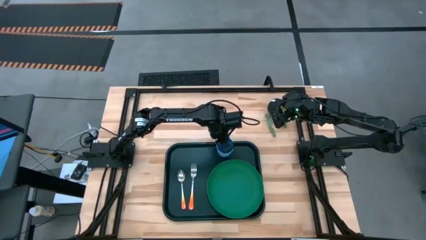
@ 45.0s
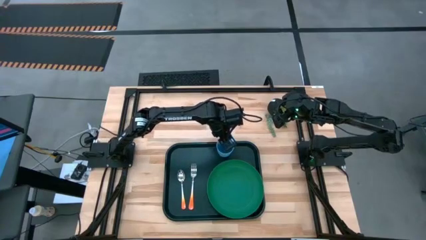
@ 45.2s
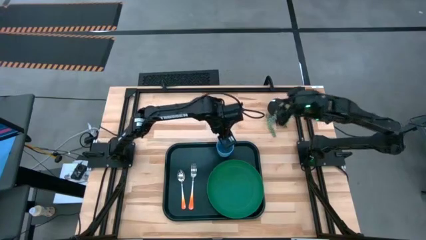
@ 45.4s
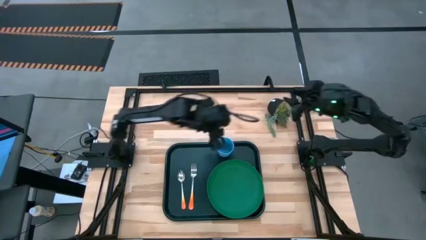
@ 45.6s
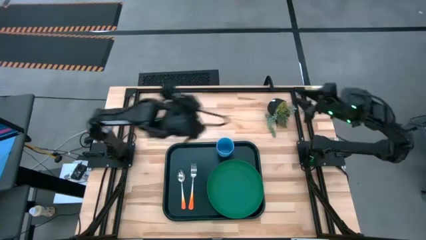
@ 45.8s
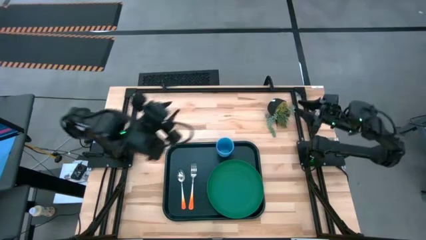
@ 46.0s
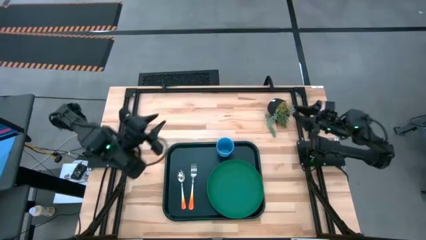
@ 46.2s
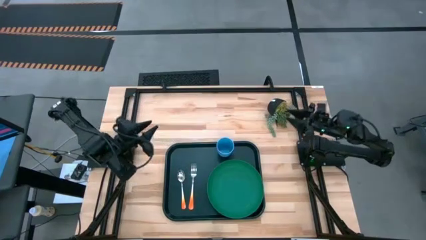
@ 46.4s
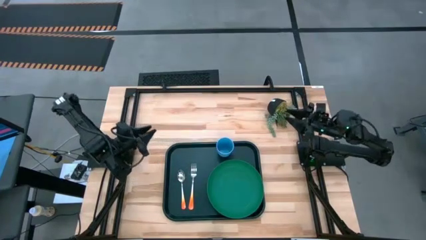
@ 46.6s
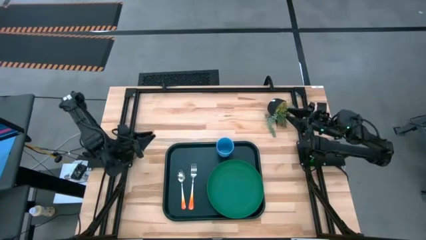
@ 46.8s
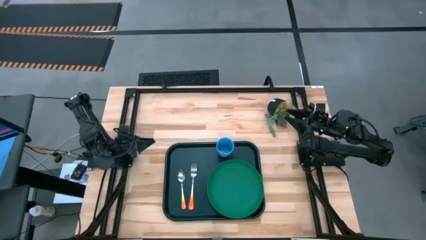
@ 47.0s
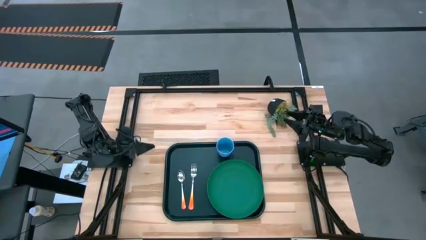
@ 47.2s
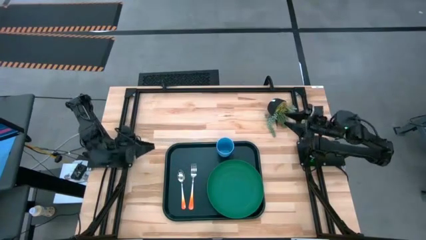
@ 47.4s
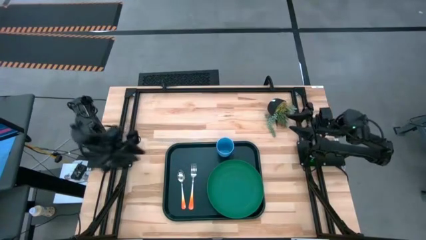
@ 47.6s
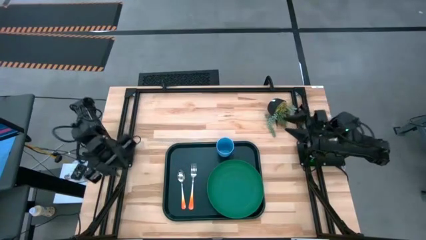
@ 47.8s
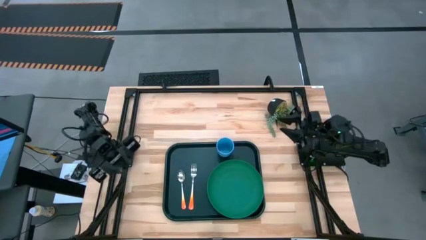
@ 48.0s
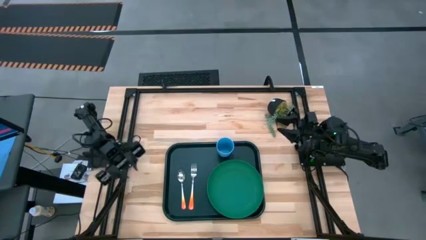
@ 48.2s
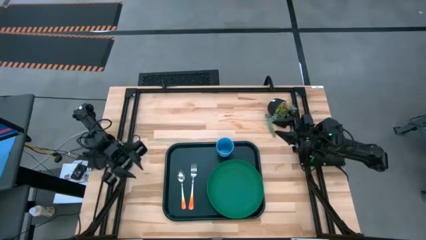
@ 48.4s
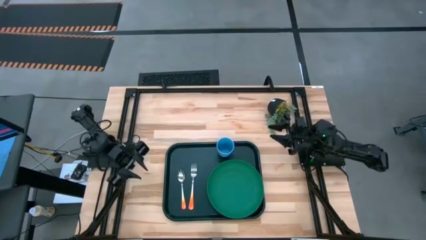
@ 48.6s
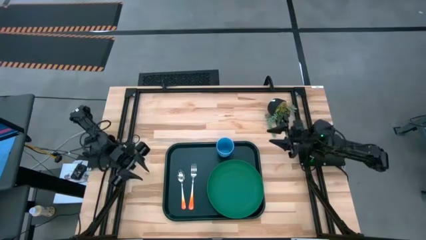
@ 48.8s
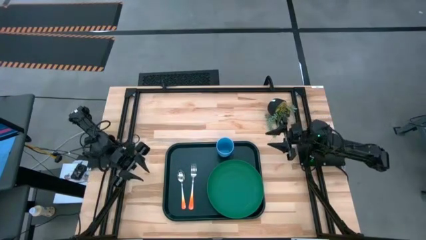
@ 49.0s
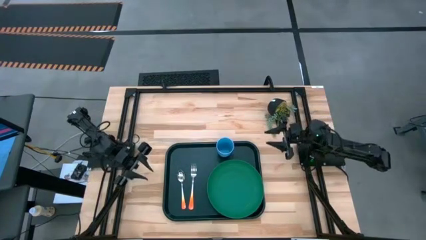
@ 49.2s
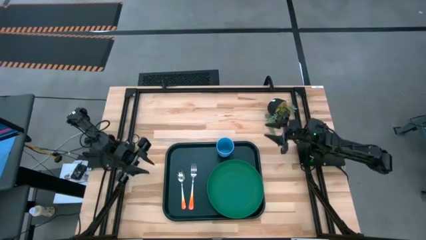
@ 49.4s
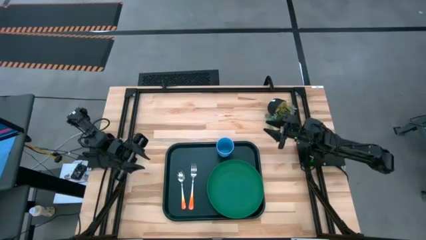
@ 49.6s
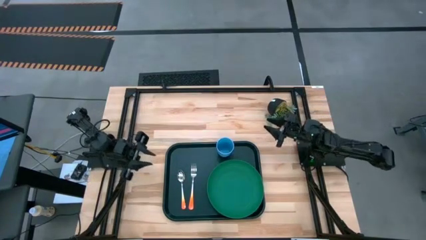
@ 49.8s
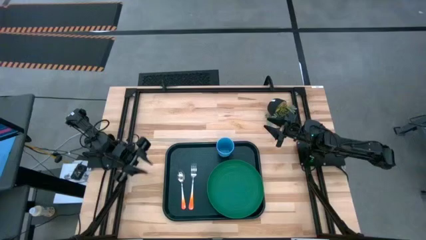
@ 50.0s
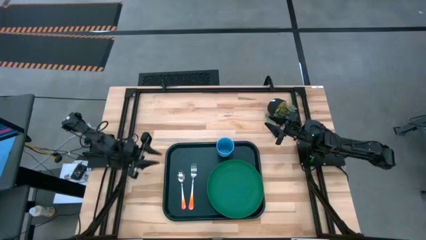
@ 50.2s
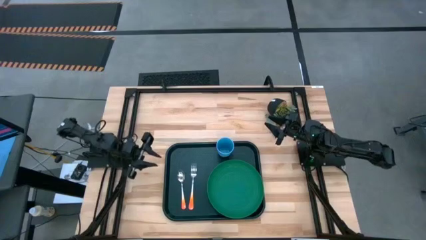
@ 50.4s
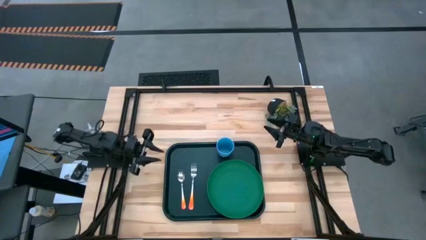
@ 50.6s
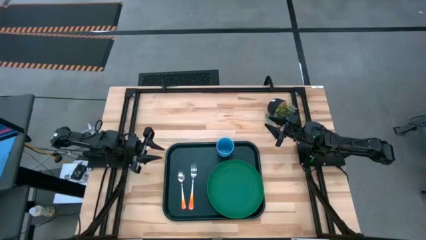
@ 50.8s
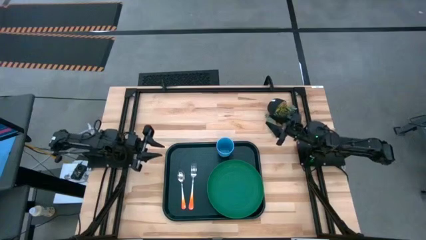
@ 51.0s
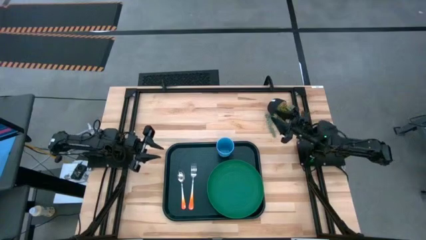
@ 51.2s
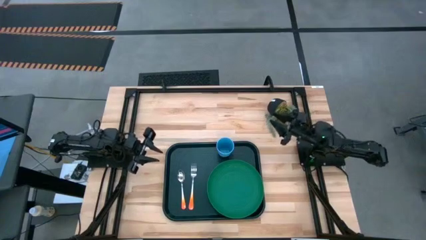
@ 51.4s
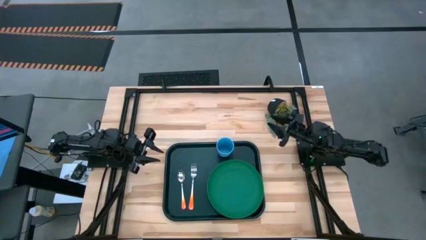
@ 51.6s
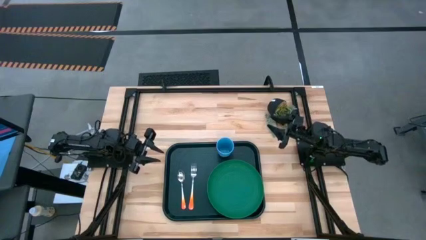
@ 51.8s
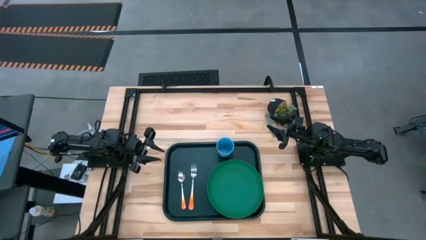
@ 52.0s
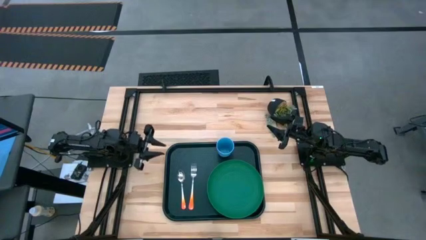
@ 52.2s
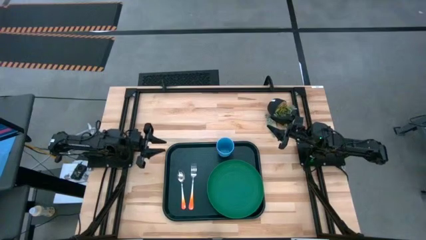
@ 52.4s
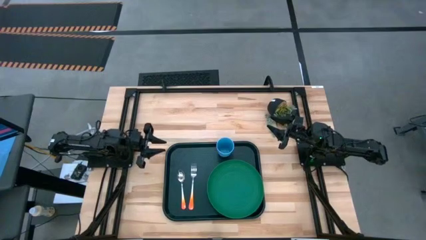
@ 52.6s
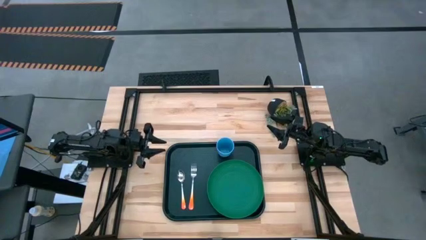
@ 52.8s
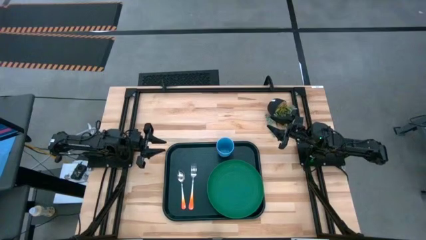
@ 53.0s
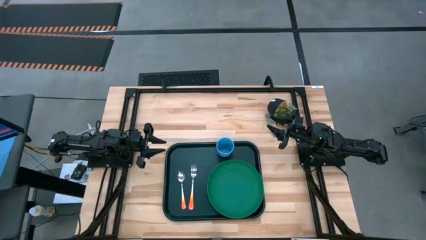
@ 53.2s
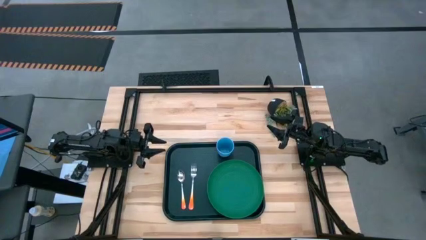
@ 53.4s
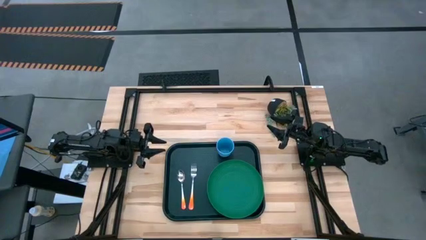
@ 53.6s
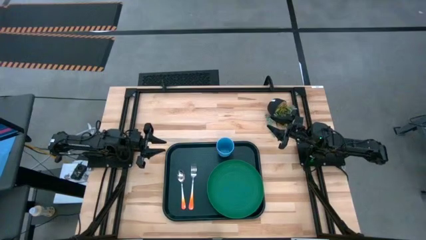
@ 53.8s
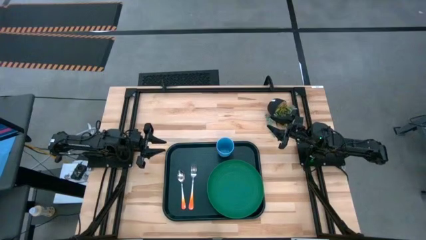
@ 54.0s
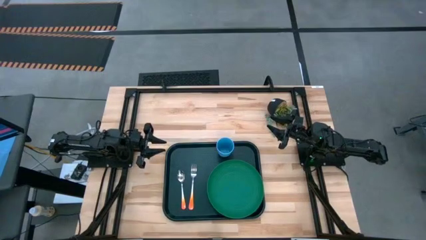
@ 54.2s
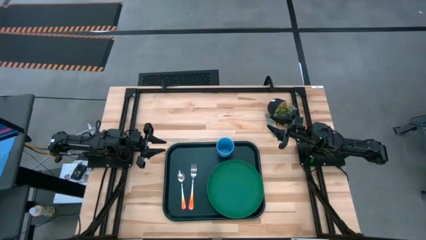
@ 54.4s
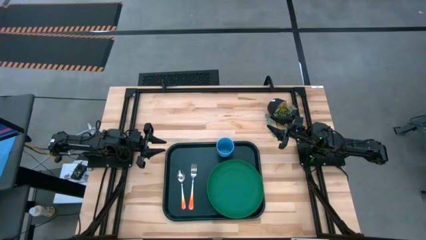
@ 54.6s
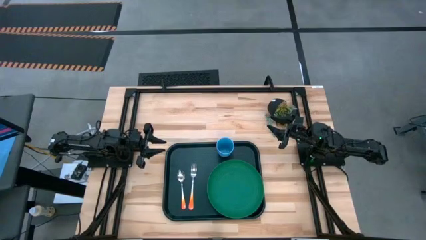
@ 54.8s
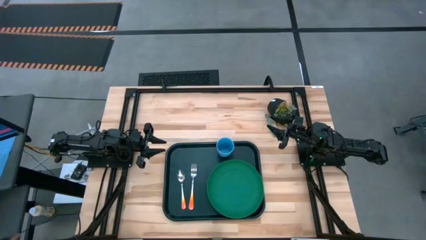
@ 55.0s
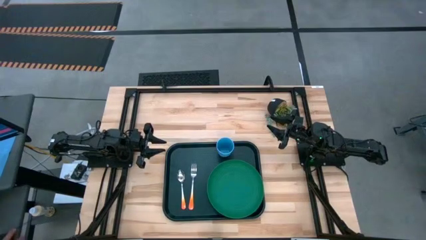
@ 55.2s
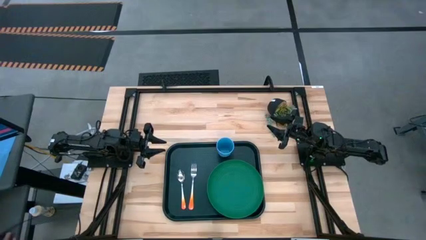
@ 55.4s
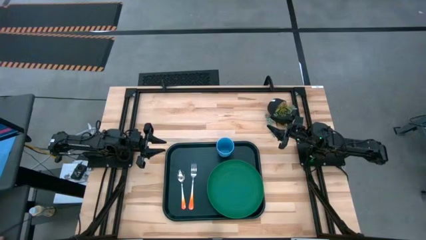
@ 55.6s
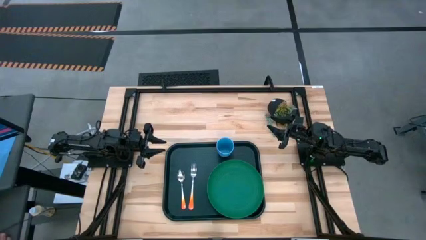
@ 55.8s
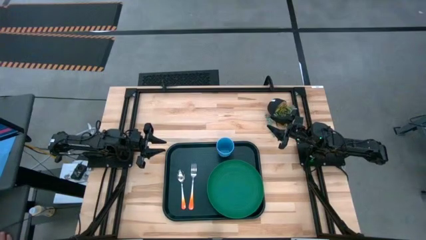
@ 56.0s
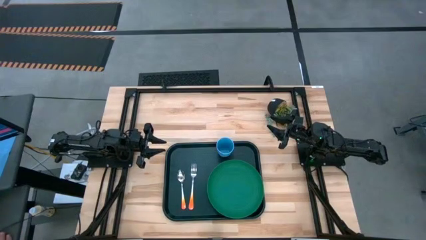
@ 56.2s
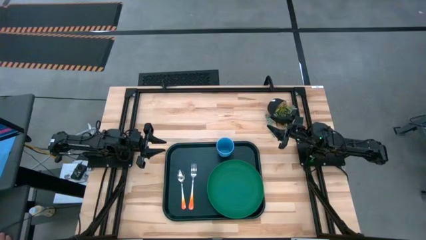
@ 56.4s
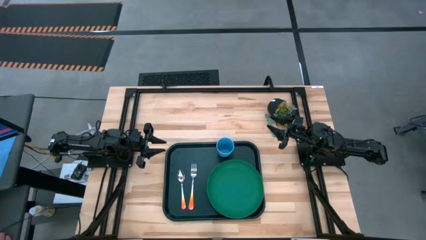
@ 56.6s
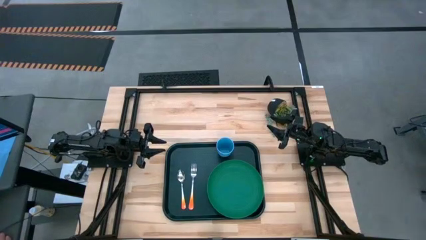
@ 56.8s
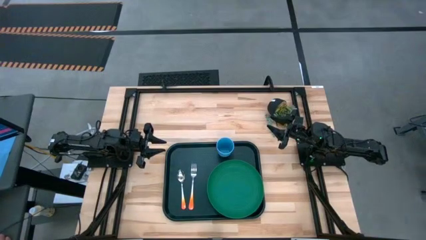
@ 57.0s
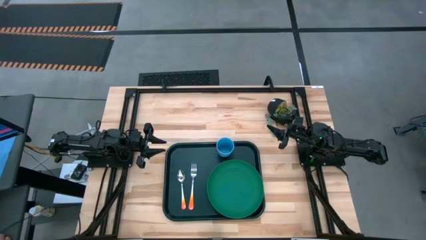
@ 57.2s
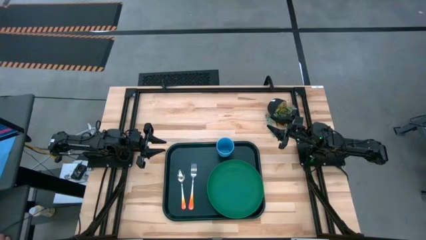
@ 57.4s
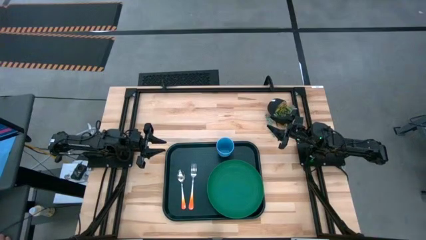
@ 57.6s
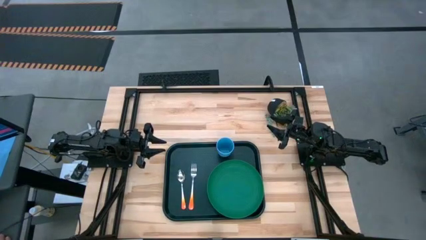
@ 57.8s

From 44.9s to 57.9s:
Task: Pick and place plate/cup/fork/spoon on tray
Return to Home Position

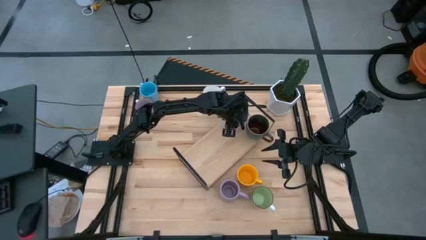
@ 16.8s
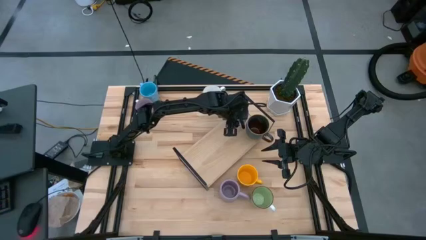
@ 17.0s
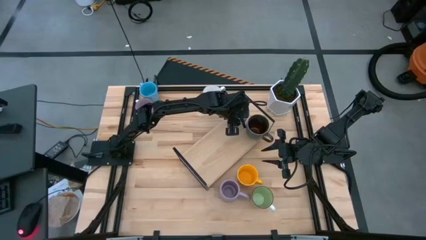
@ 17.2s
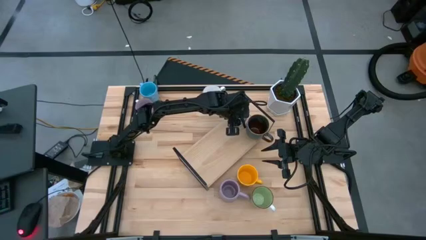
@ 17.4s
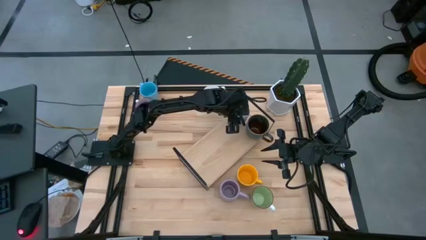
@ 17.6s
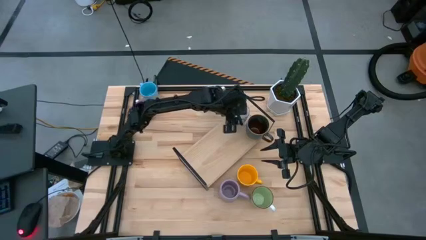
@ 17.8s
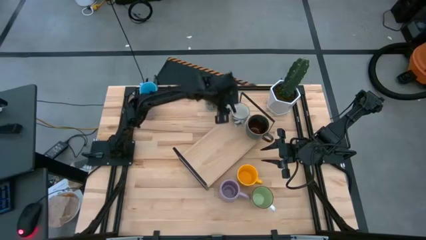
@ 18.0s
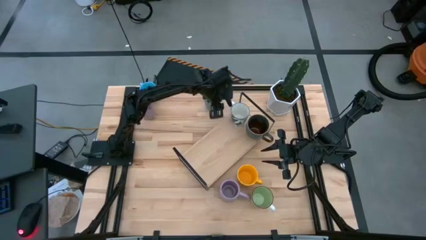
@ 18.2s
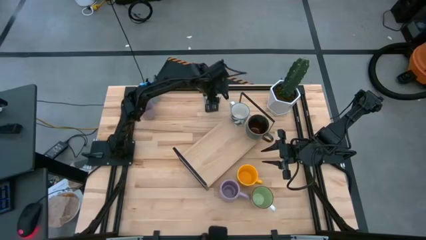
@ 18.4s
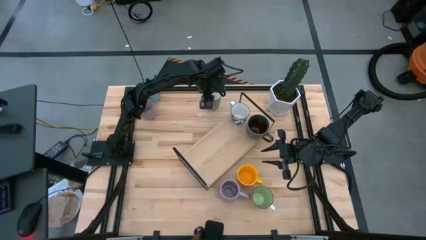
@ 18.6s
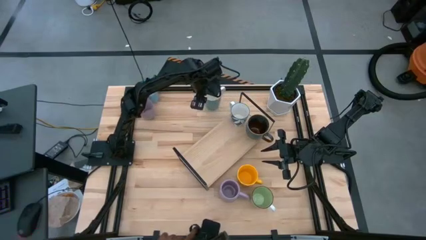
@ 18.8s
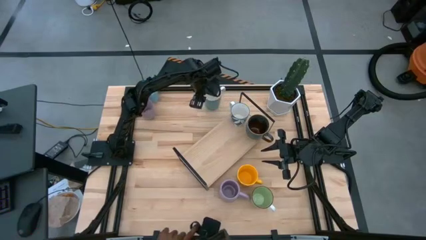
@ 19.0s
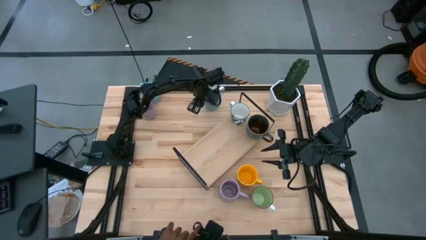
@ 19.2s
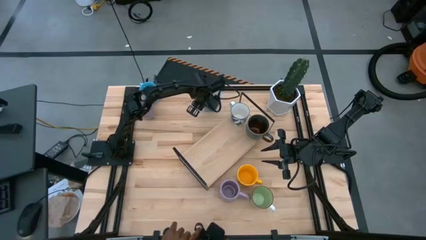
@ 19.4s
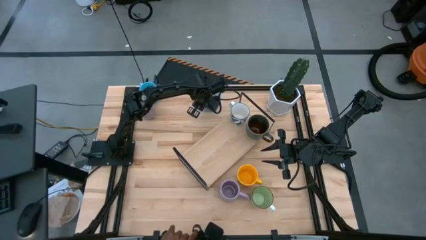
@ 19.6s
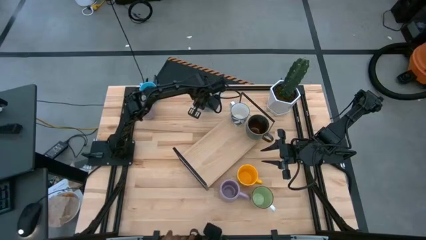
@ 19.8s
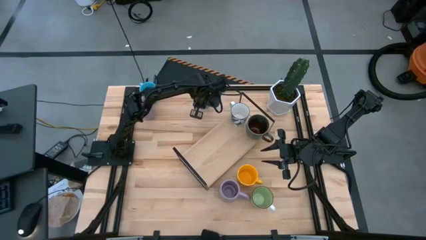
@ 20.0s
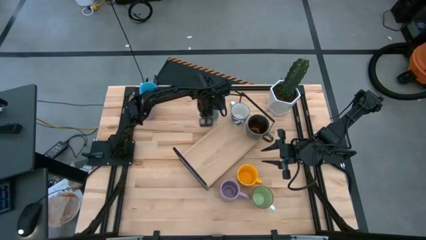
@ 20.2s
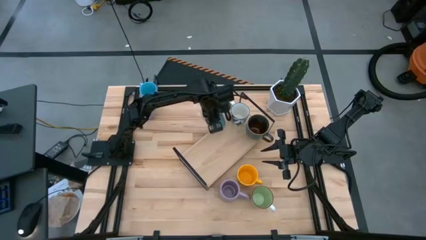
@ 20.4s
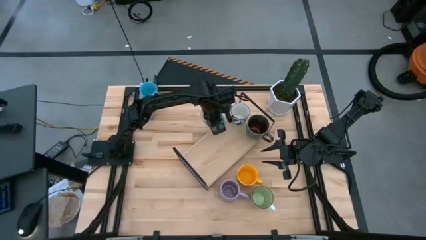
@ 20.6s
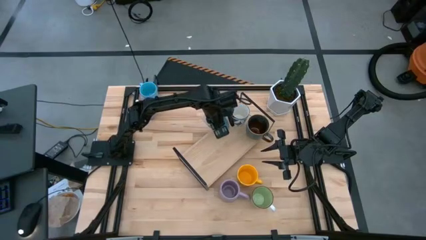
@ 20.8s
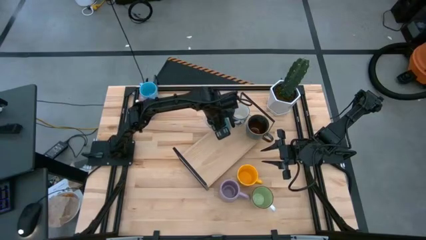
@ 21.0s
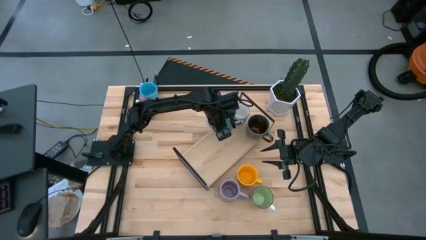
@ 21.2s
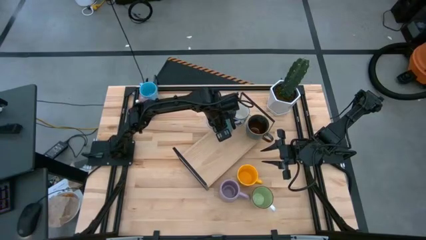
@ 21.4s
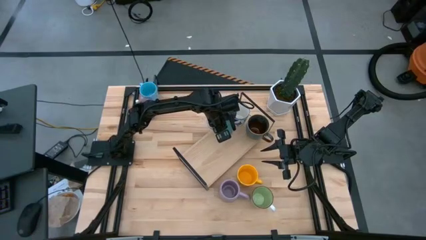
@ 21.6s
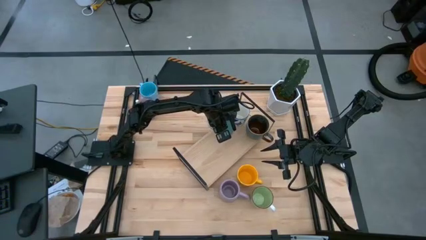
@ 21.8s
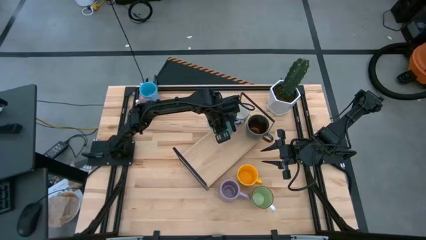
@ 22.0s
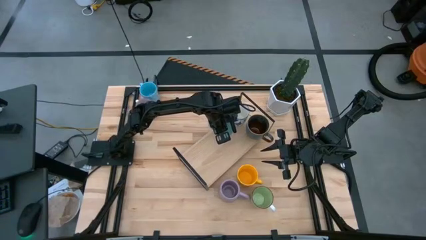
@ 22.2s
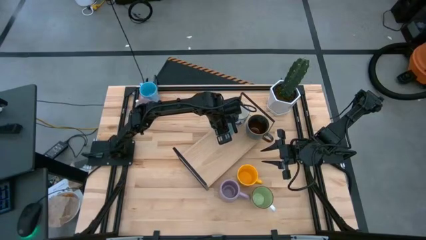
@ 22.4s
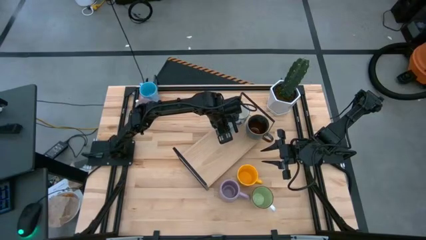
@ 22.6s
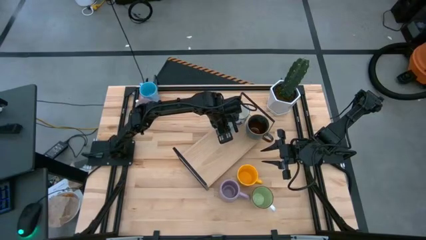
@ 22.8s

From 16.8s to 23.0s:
Task: Place coffee mugs
Put the blue mug on the shelf
